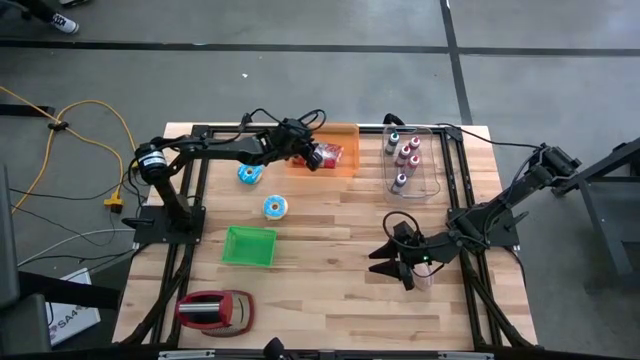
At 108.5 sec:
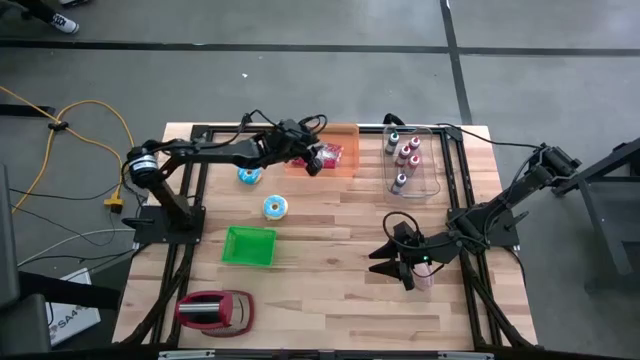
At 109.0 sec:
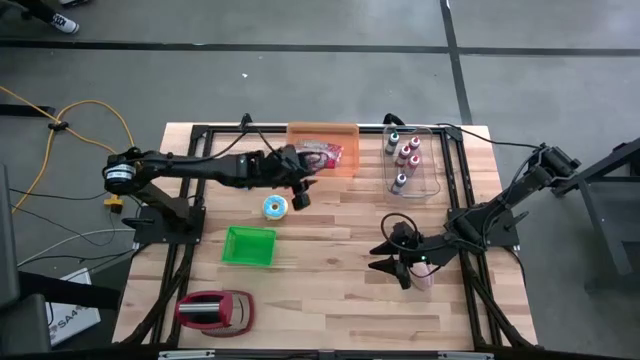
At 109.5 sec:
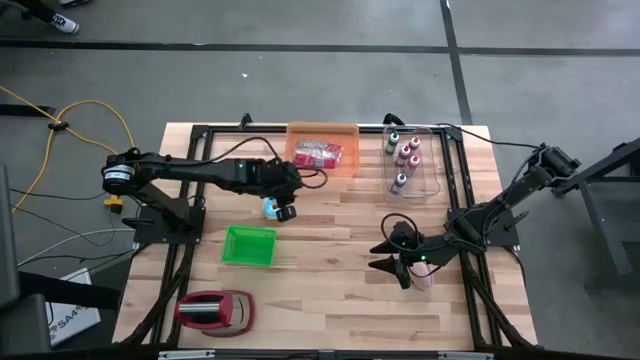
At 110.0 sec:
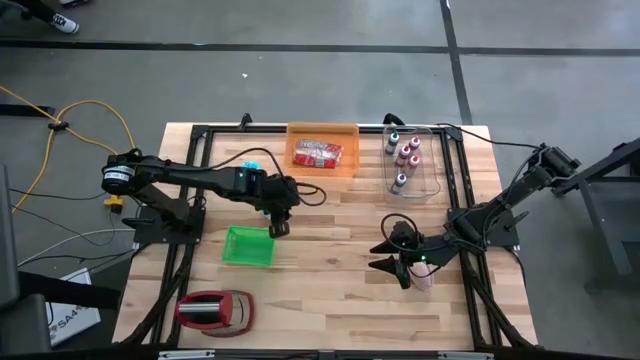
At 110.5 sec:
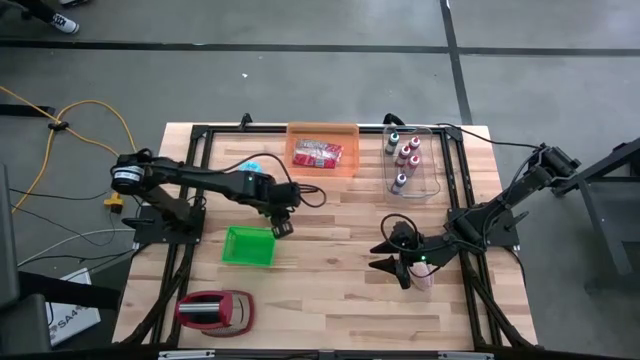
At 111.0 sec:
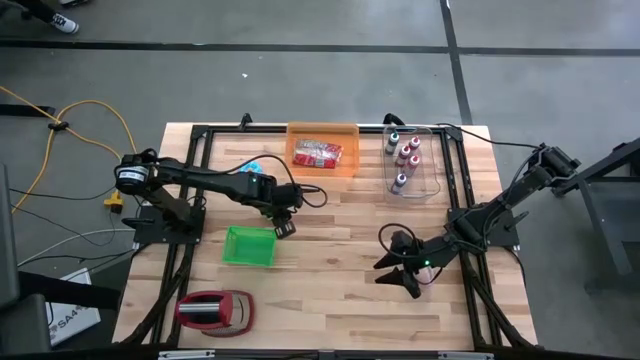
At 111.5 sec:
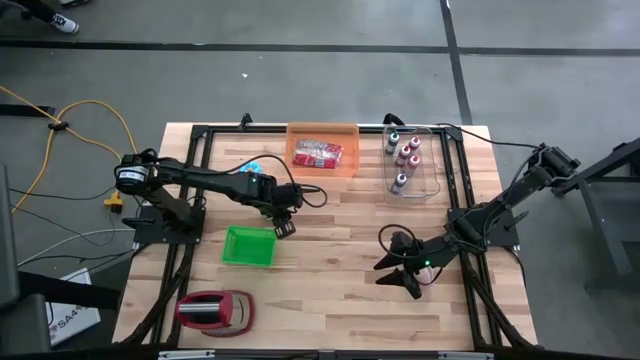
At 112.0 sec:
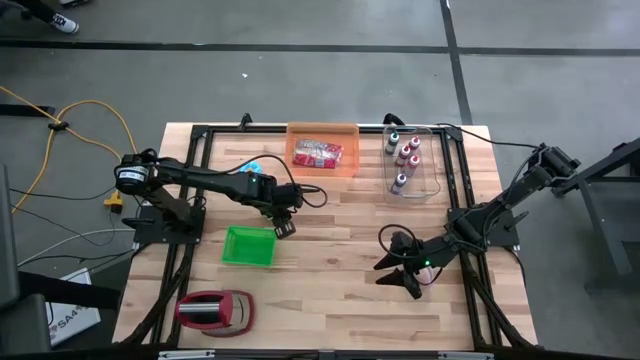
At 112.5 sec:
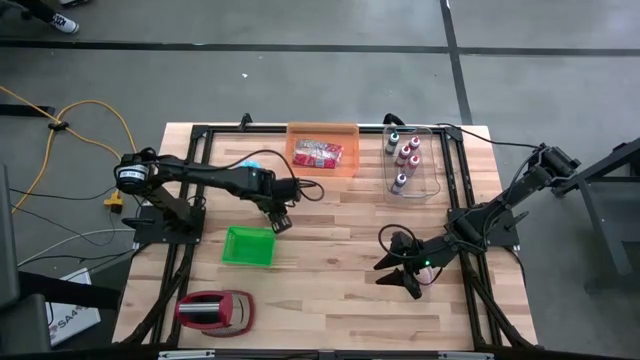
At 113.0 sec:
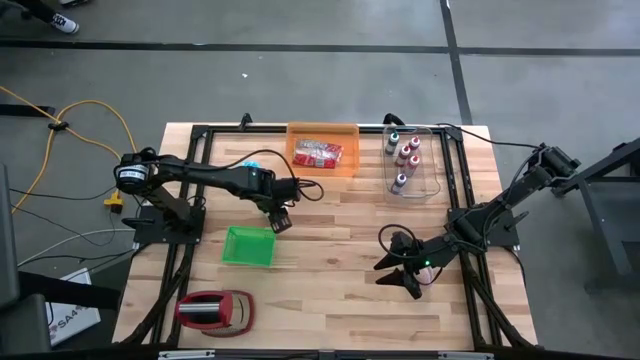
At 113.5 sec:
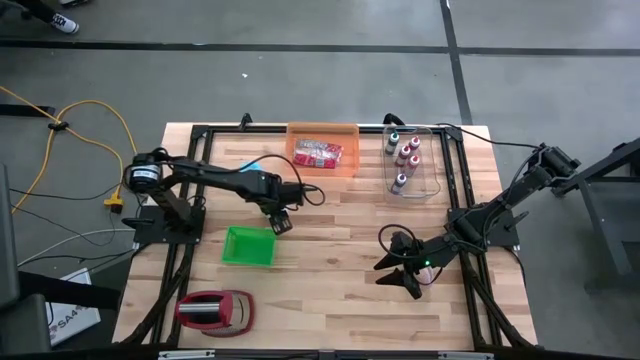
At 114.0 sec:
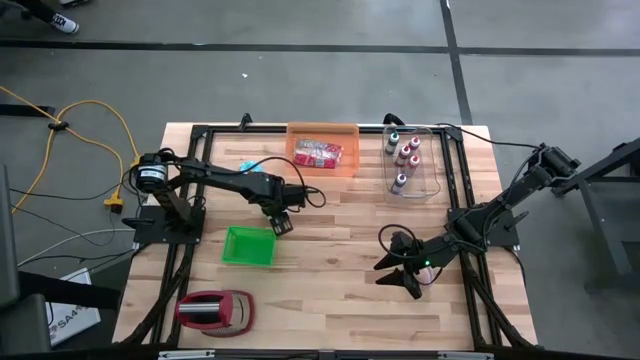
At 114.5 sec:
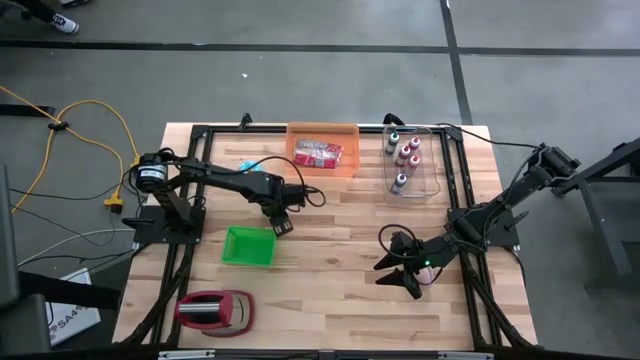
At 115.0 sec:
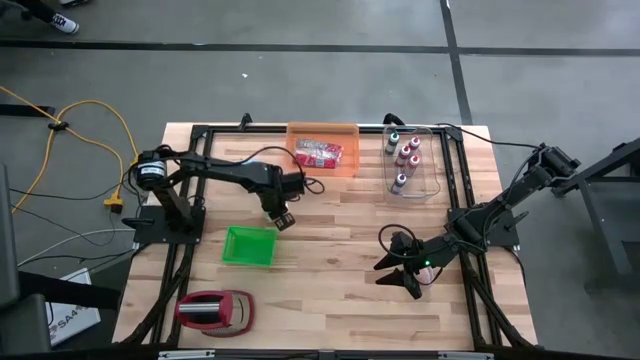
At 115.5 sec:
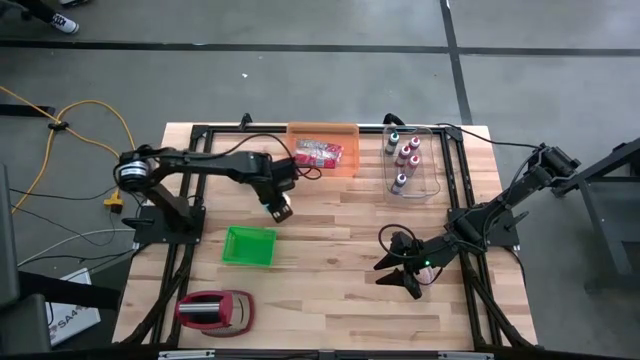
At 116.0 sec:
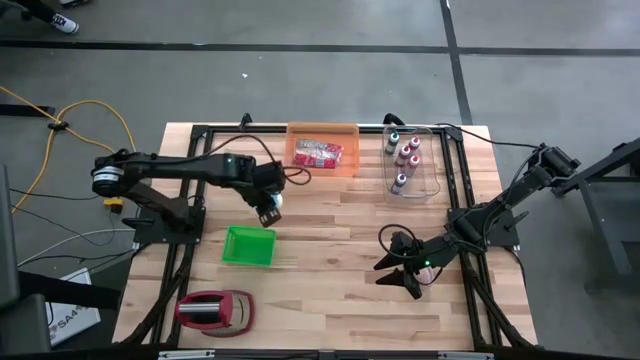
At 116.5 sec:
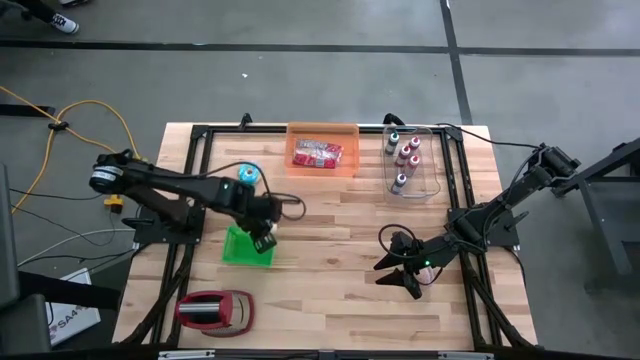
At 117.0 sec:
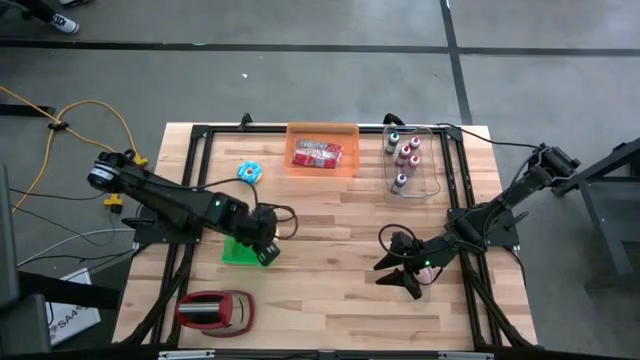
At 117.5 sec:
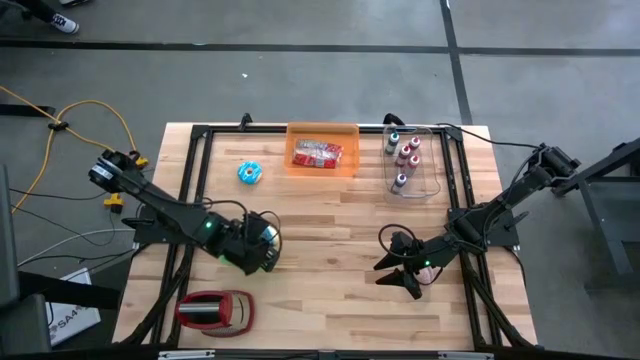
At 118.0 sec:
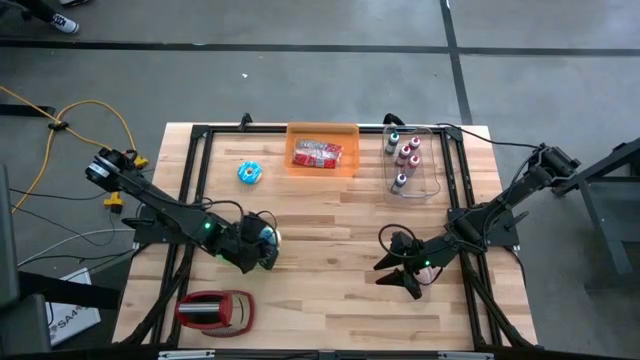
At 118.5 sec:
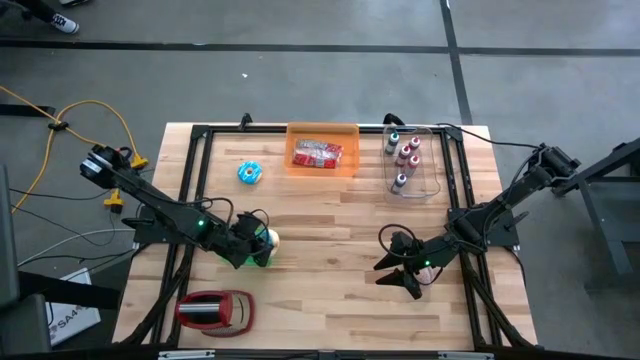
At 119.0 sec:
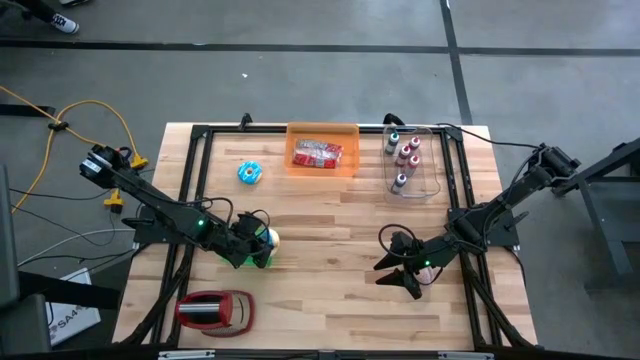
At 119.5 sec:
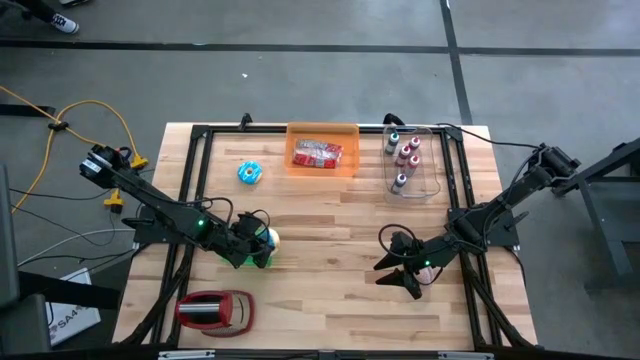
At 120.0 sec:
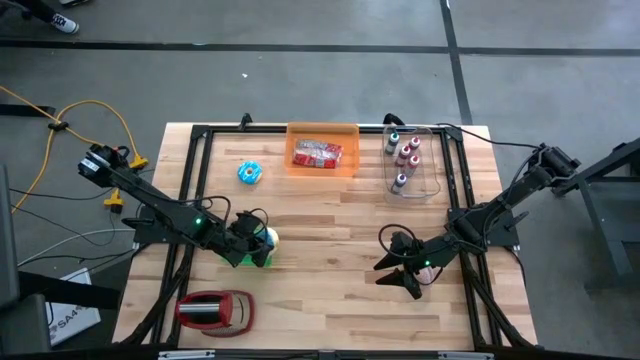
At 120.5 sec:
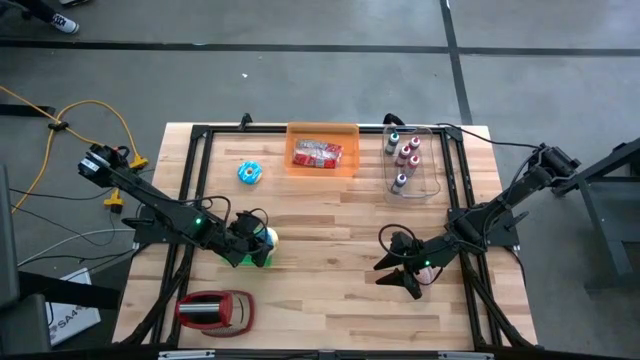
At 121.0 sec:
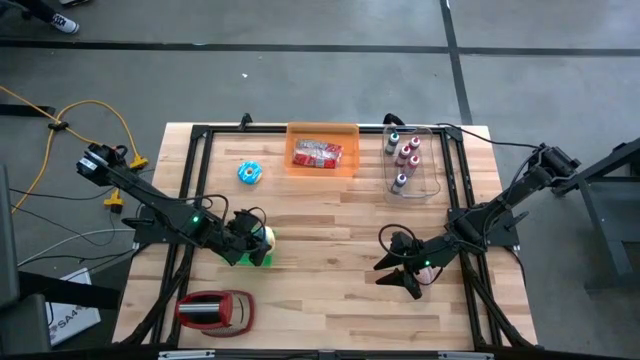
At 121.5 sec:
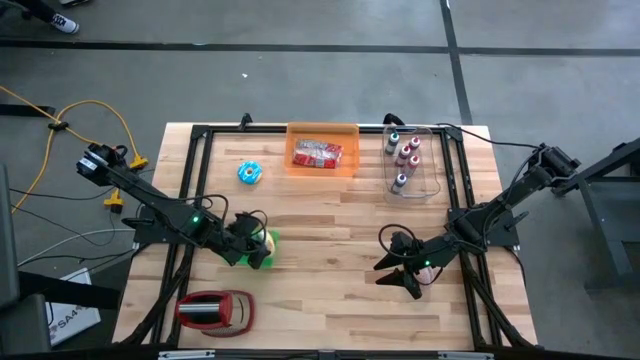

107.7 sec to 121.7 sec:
Put the bottom blue donut into the green bin

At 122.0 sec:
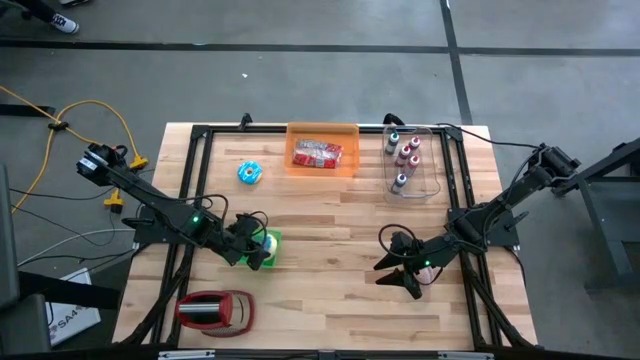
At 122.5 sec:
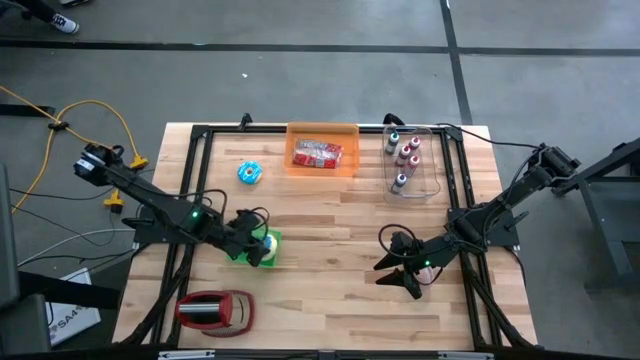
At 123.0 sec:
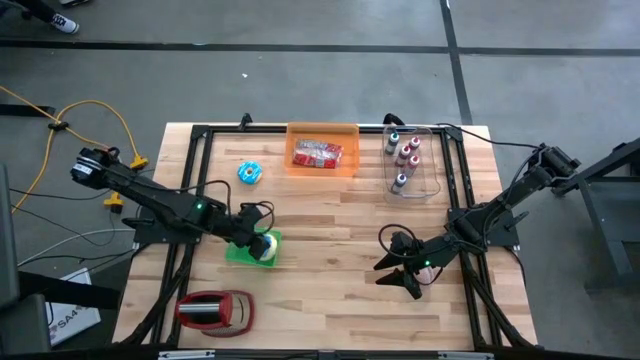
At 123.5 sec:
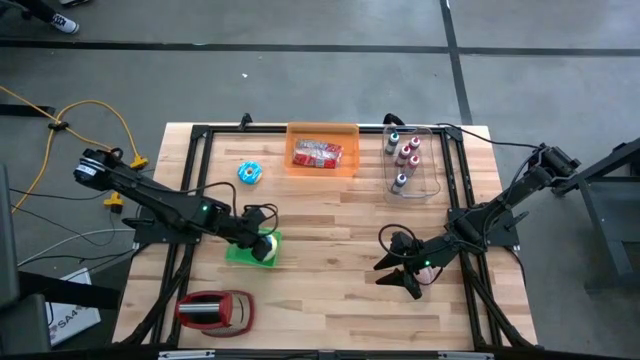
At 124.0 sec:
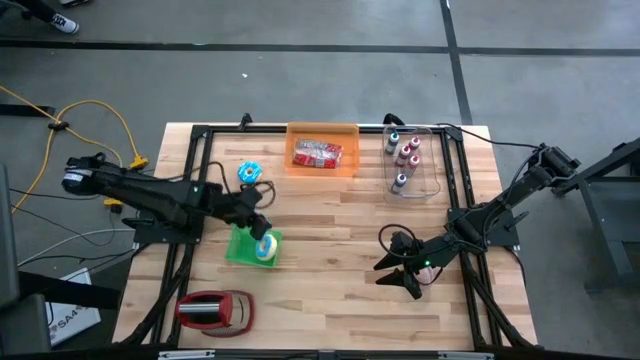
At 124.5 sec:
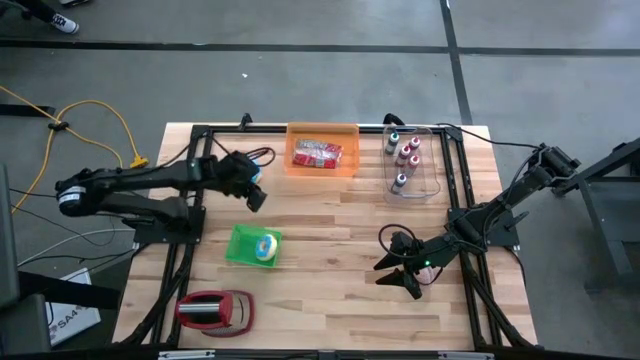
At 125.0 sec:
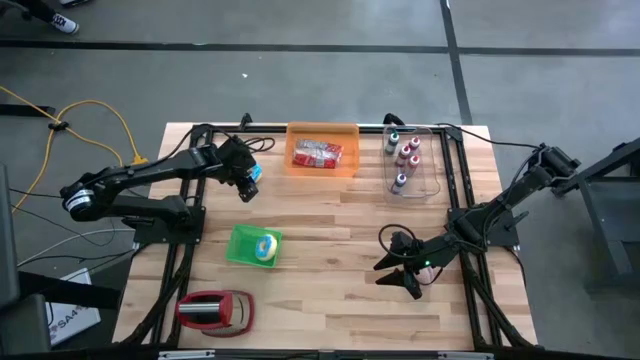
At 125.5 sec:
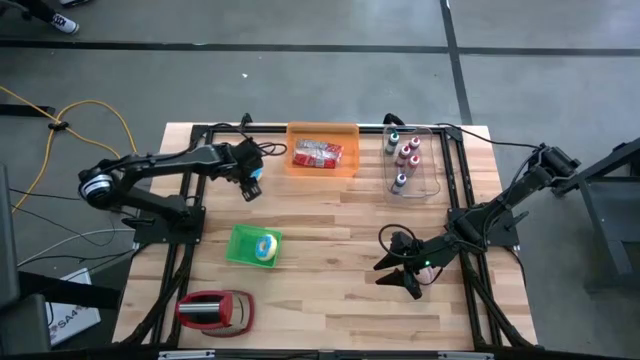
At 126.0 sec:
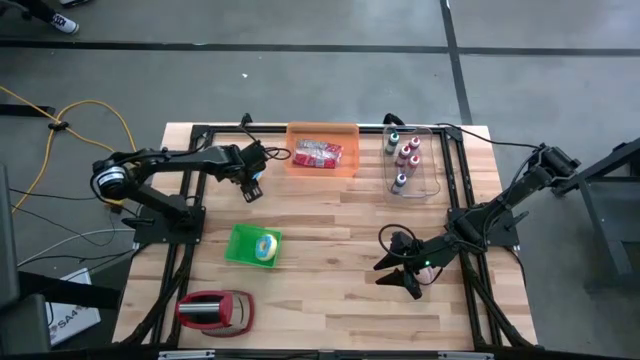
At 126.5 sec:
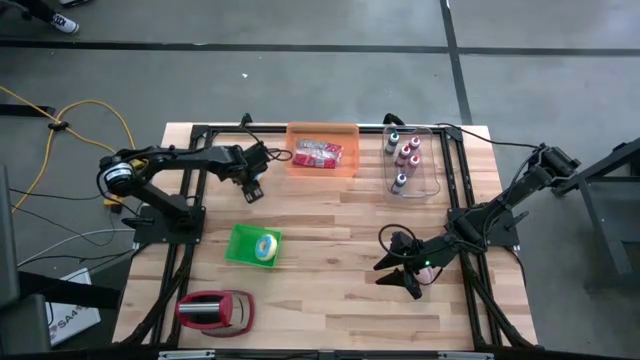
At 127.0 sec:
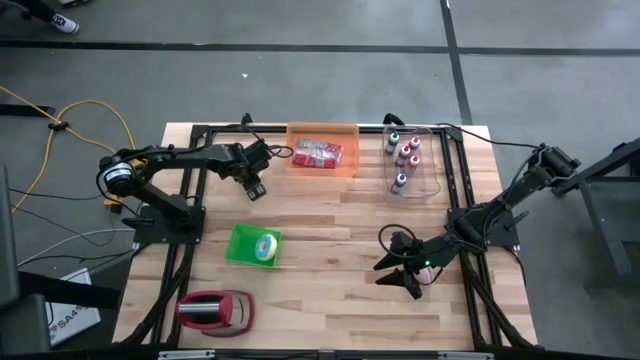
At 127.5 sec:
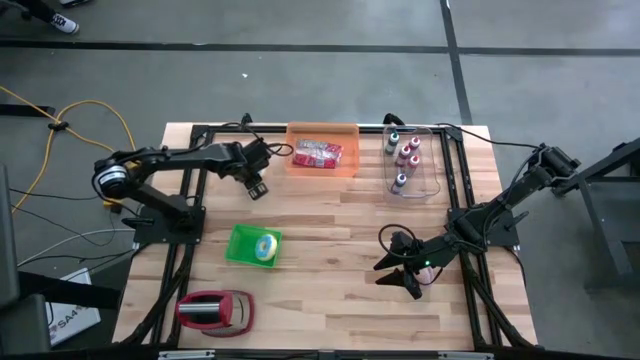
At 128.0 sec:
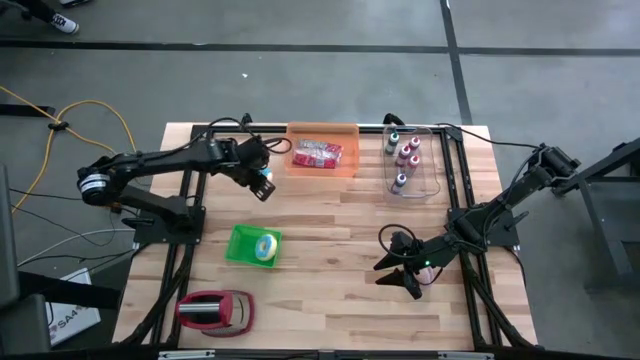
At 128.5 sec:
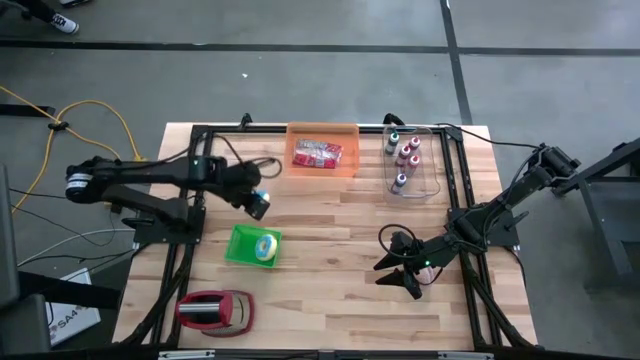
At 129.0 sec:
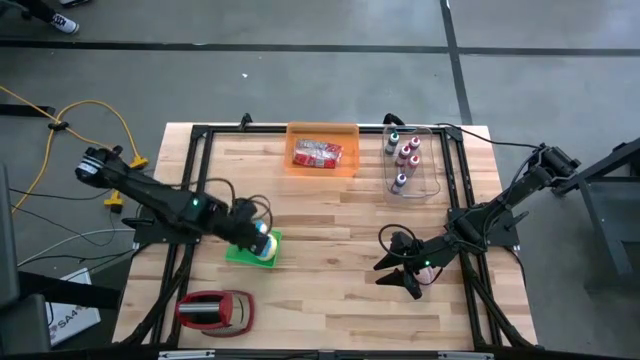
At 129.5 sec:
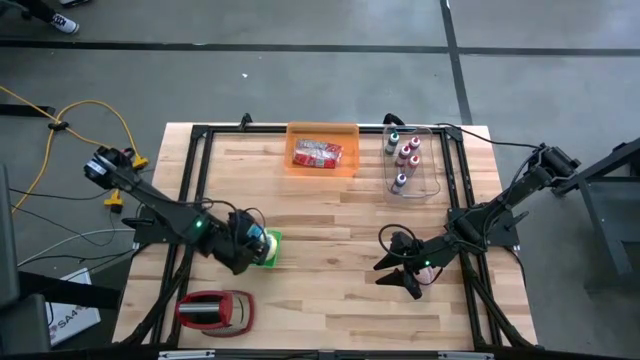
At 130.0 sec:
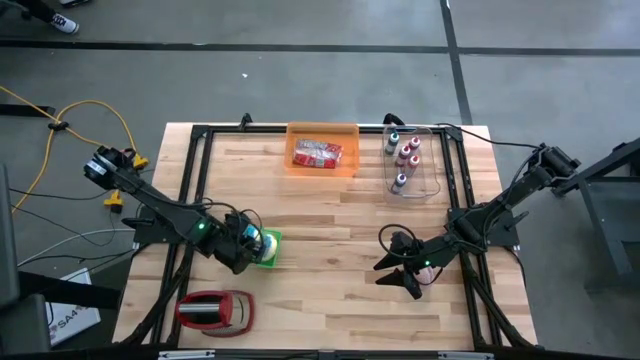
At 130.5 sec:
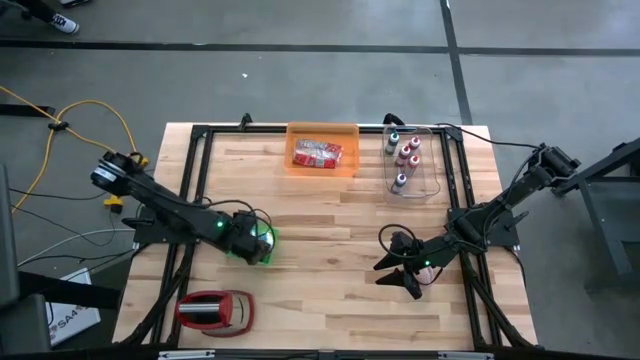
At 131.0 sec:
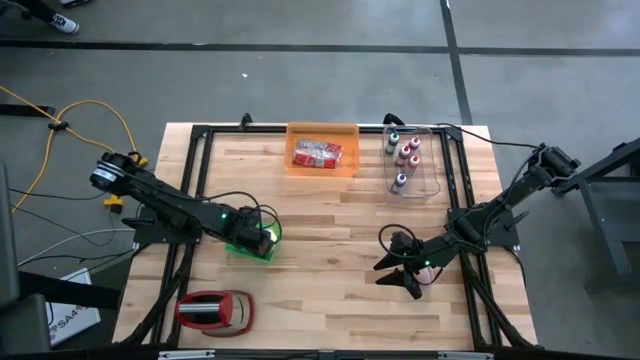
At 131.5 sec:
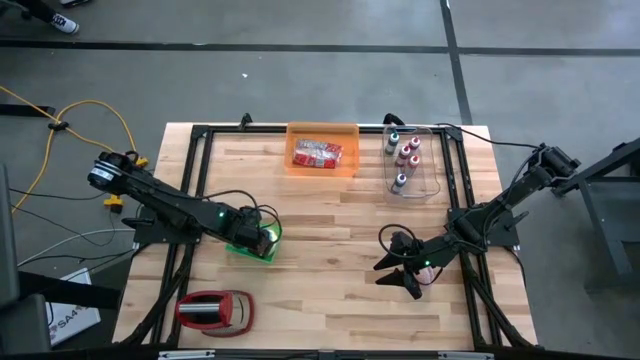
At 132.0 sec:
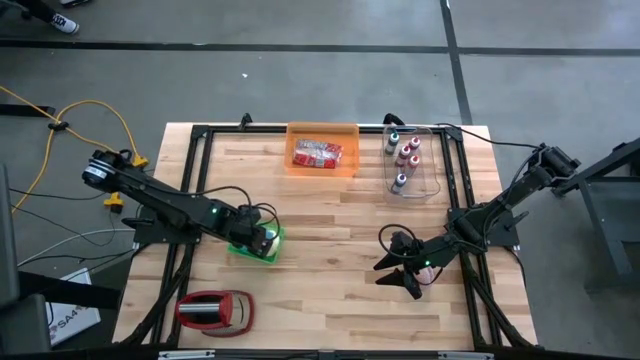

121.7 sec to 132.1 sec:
Put the blue donut into the green bin
